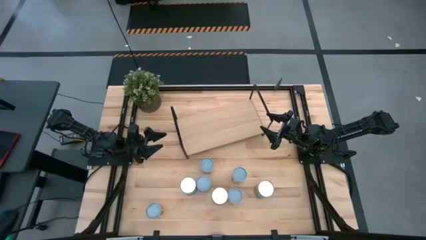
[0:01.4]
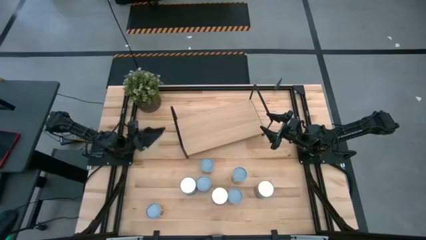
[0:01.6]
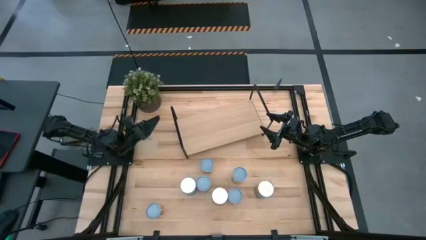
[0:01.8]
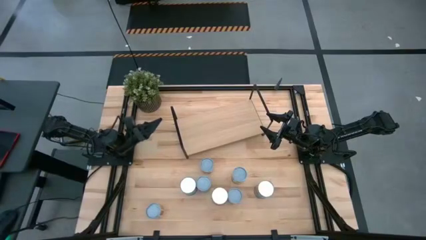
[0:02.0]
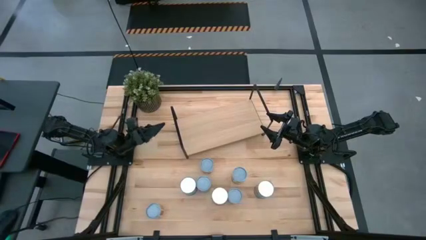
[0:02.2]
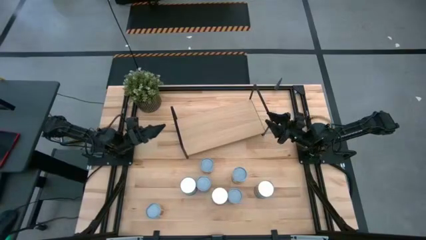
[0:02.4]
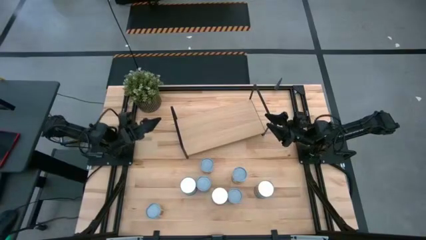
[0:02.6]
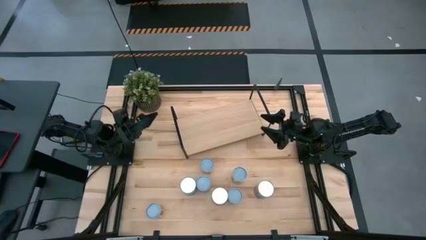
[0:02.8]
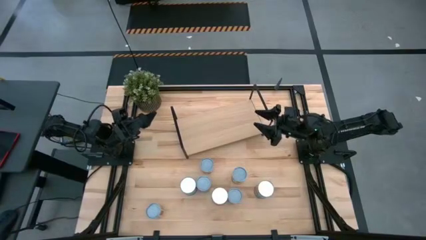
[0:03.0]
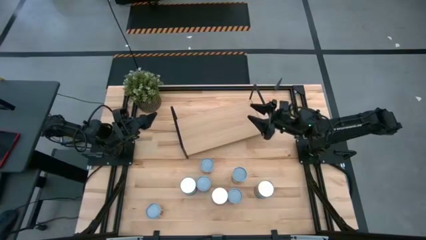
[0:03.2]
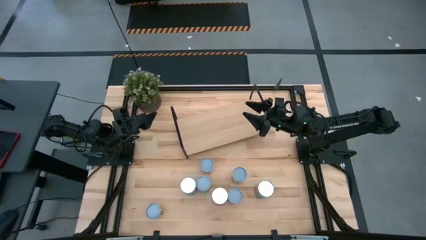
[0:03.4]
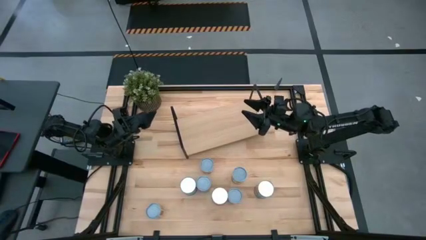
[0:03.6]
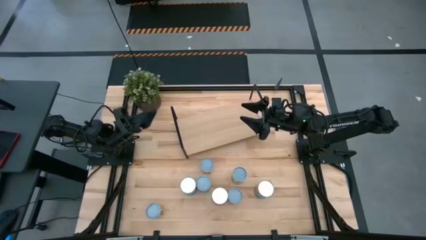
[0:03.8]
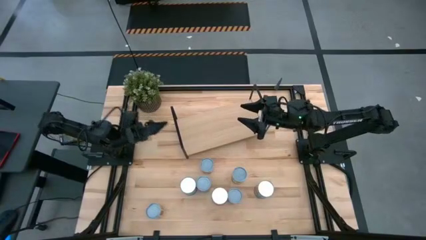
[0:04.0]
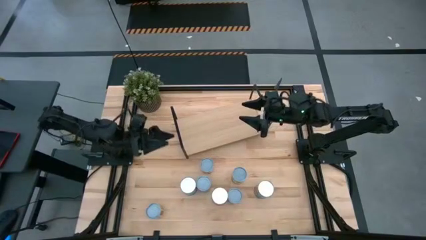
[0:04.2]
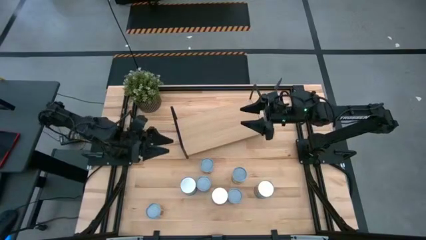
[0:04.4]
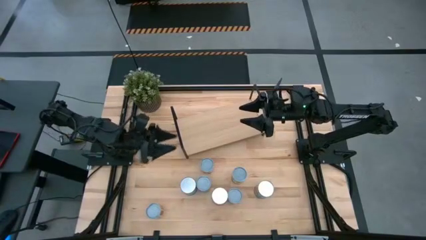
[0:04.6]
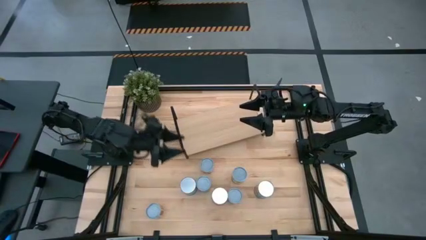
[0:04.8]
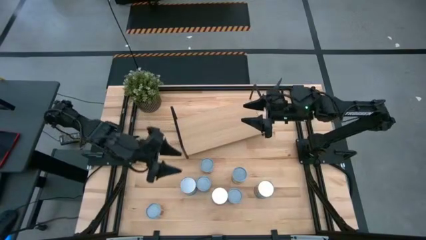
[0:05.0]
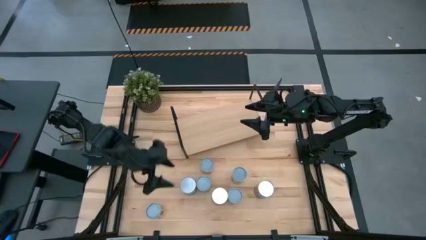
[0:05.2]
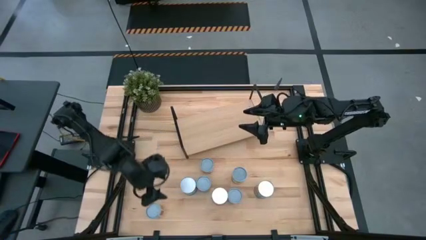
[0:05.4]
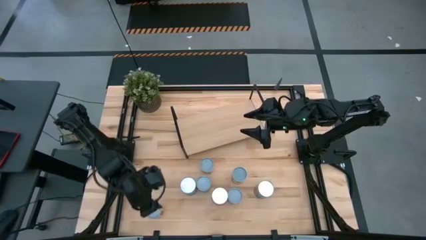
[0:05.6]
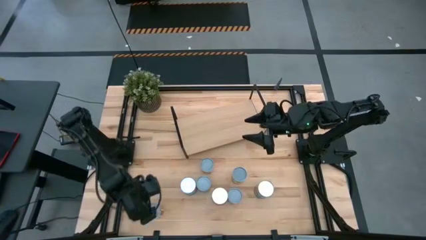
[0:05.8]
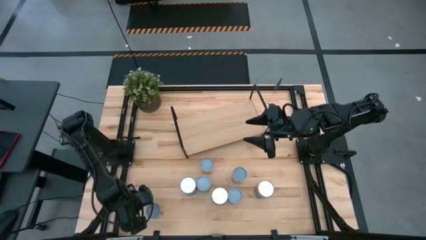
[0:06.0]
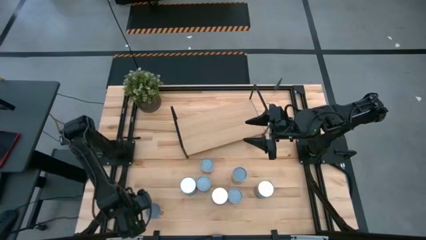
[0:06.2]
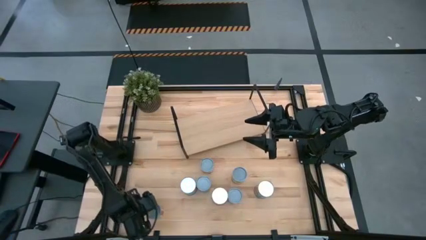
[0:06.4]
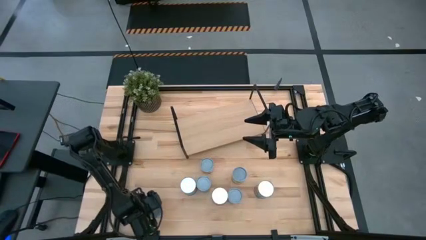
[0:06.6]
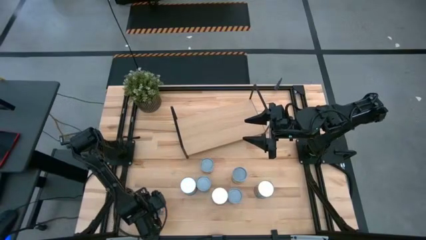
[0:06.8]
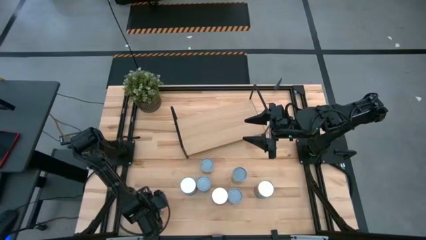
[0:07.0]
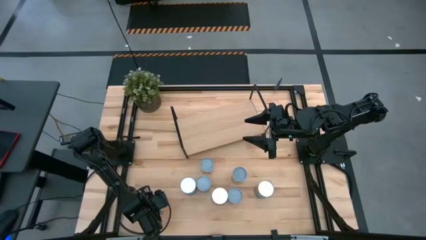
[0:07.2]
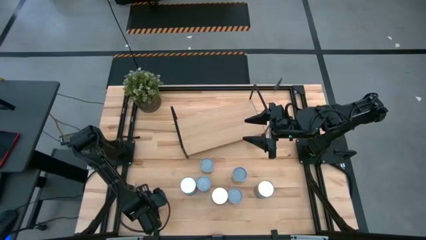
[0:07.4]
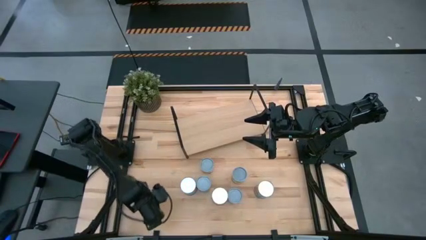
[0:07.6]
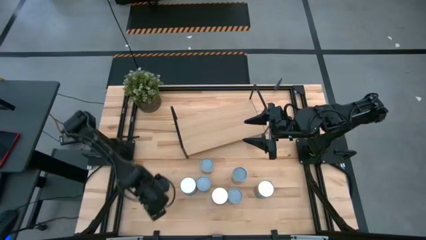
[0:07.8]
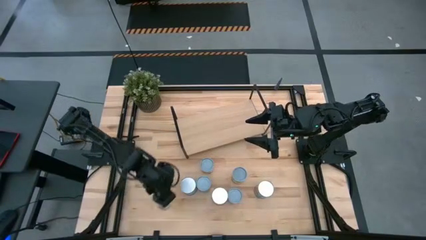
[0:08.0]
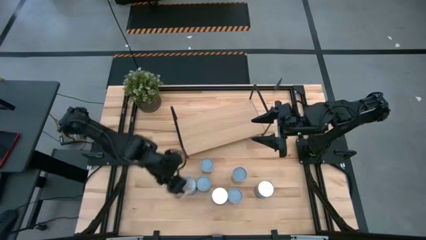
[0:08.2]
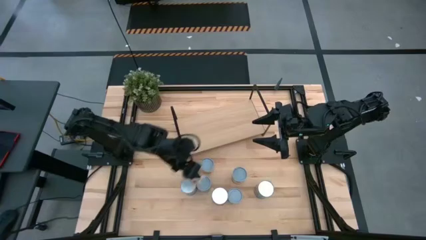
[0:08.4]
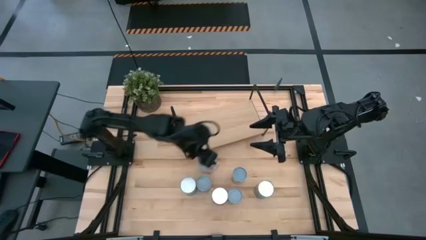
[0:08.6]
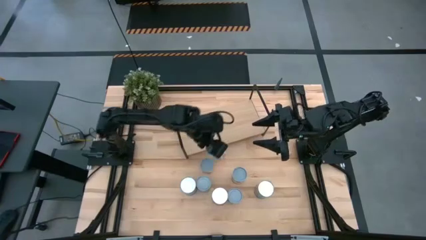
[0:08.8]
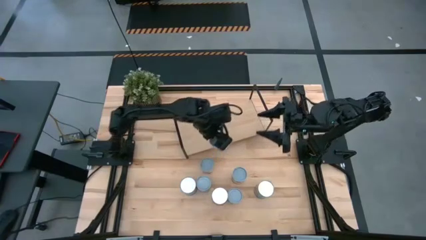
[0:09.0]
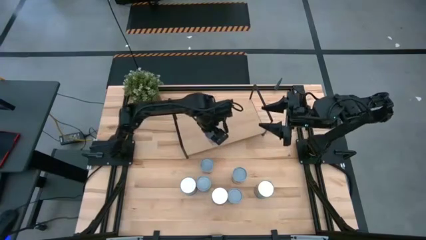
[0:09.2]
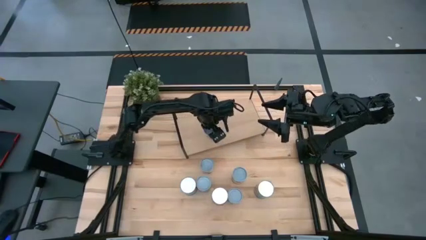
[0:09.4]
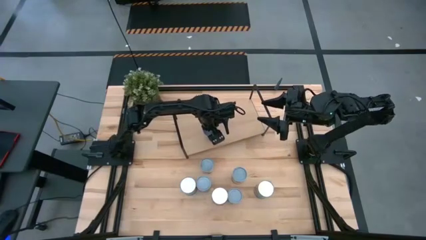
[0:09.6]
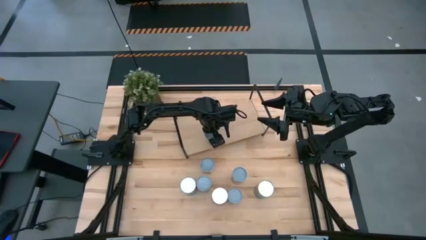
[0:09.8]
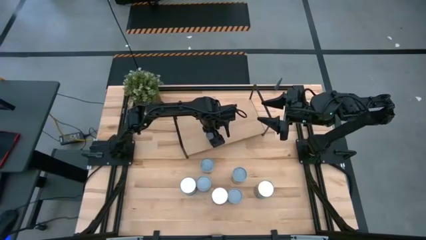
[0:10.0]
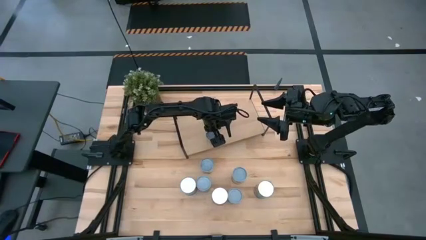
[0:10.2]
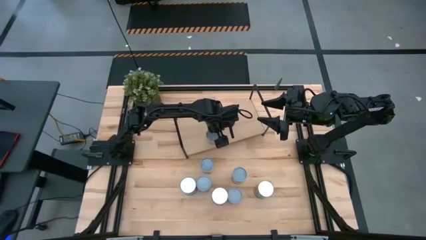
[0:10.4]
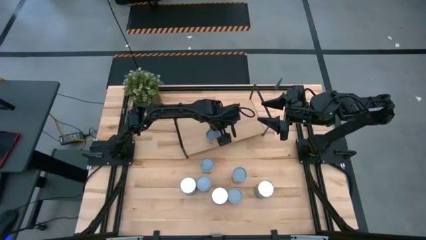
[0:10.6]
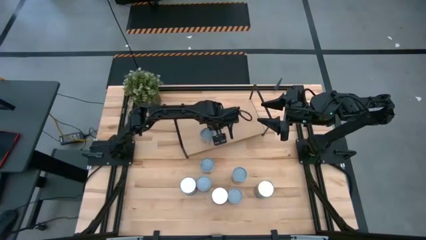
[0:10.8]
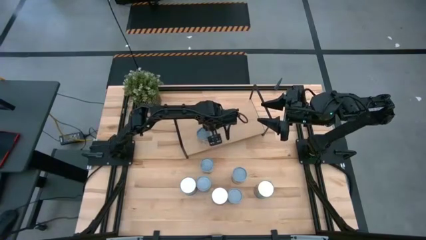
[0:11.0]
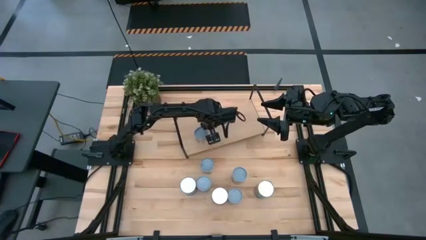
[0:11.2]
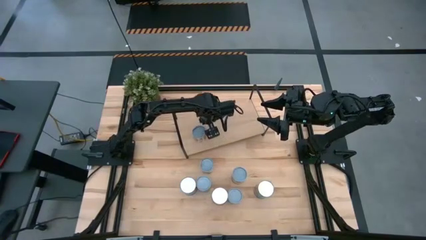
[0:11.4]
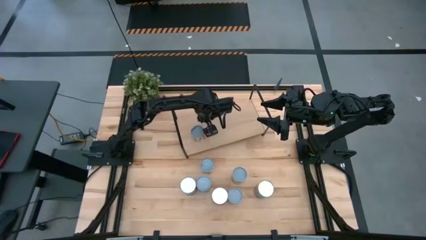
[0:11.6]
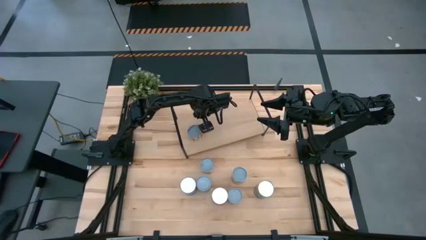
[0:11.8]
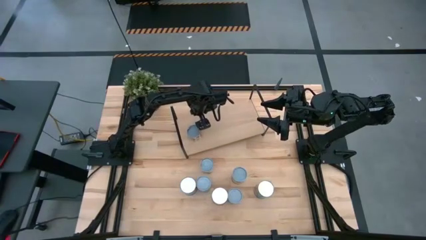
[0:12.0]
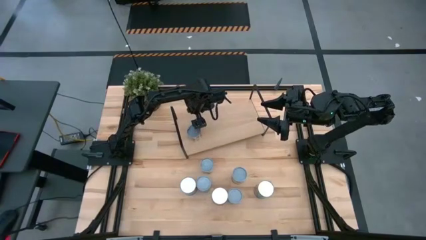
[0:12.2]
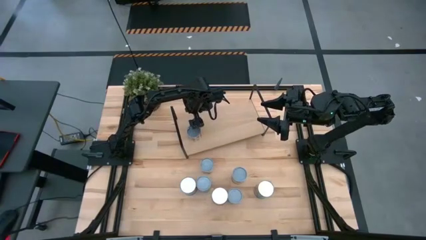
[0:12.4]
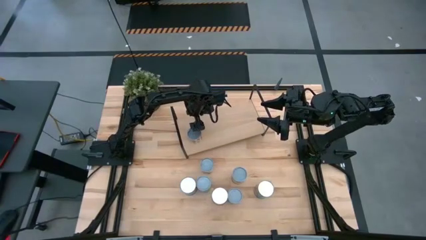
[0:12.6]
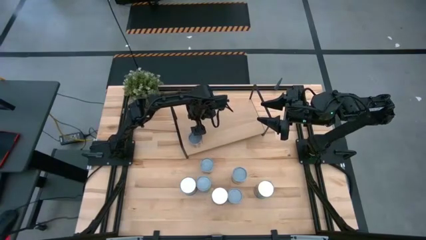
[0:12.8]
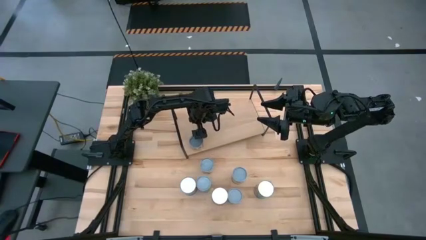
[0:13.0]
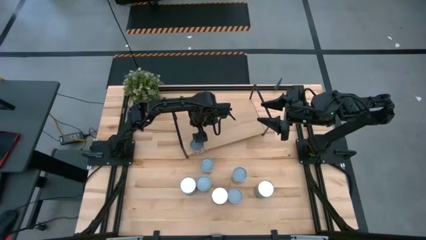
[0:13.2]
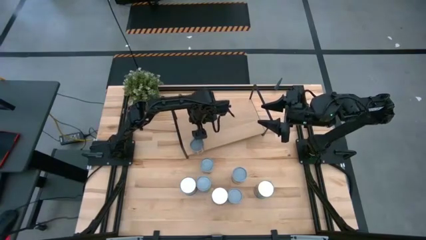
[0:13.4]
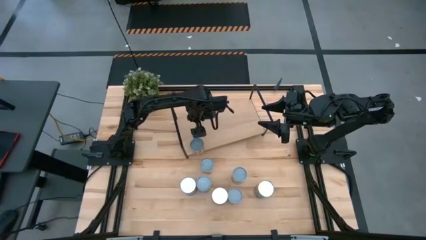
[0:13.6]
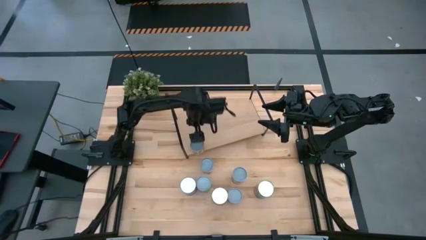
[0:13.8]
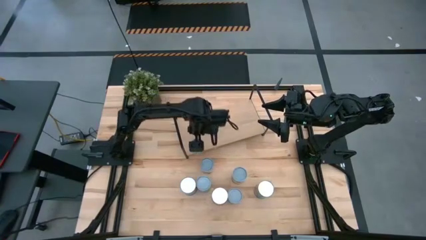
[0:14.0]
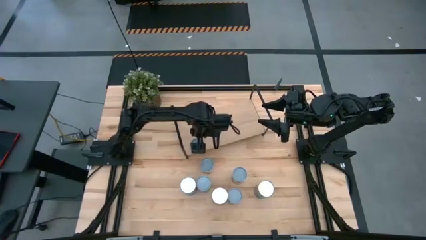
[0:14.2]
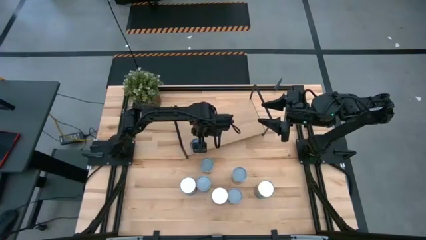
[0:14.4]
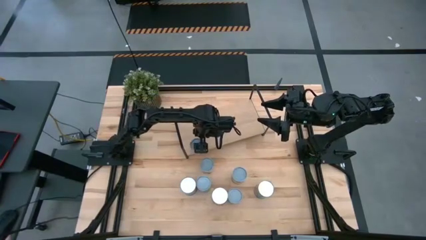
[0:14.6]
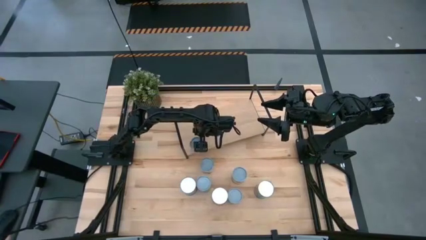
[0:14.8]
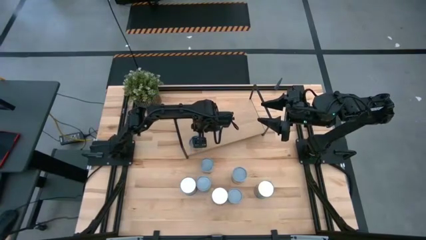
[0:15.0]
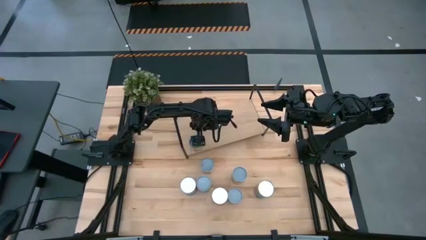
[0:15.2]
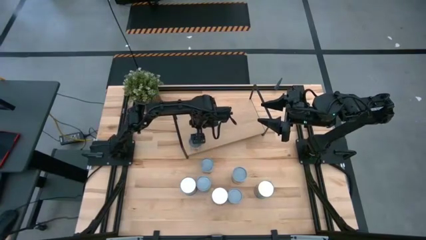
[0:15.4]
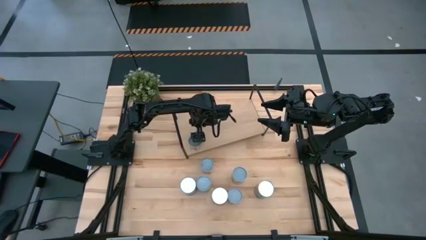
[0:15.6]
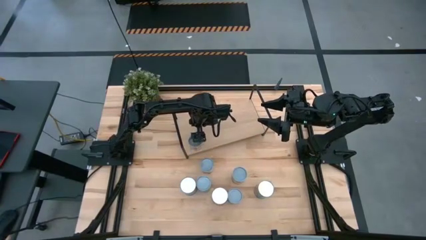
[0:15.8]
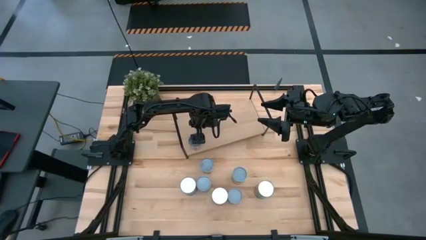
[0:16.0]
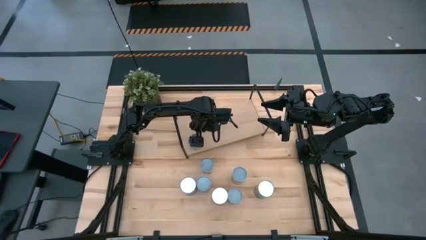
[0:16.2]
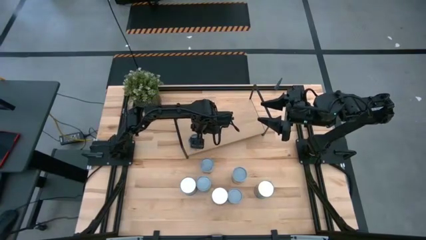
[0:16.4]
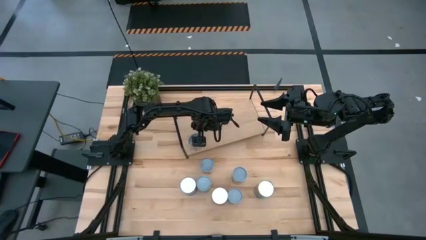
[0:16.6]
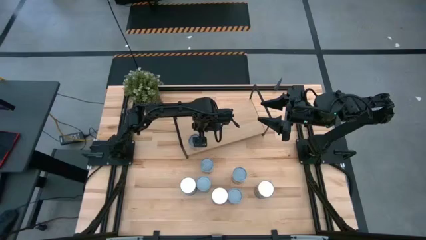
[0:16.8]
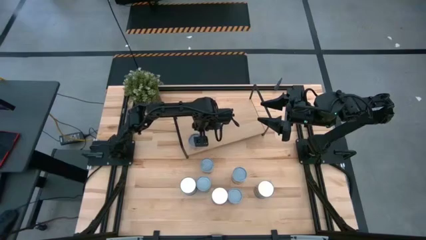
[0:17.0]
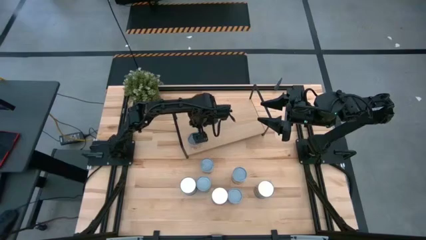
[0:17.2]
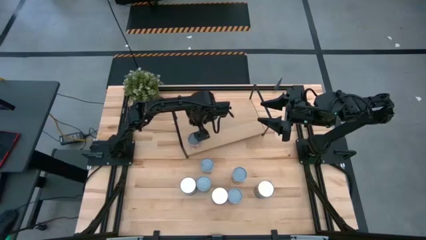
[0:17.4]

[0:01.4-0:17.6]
Task: Pick and place cans onto a shelf
Put the canned tomatoes on the shelf
